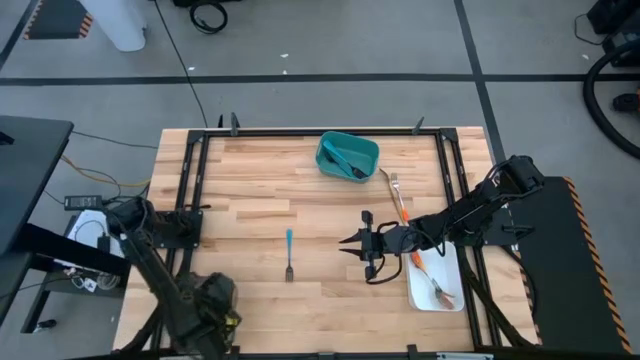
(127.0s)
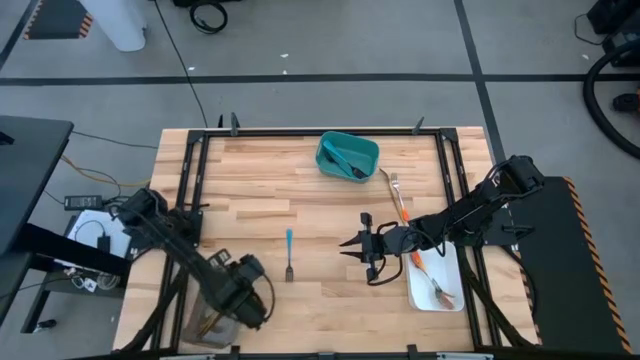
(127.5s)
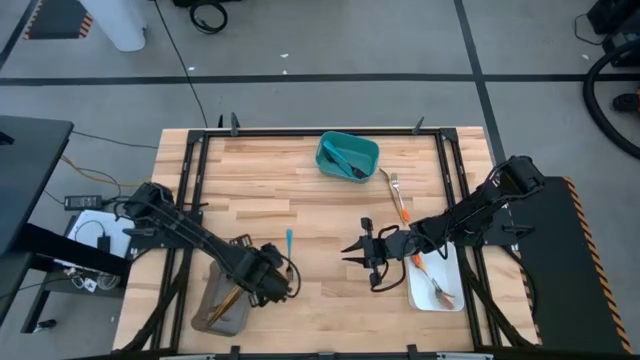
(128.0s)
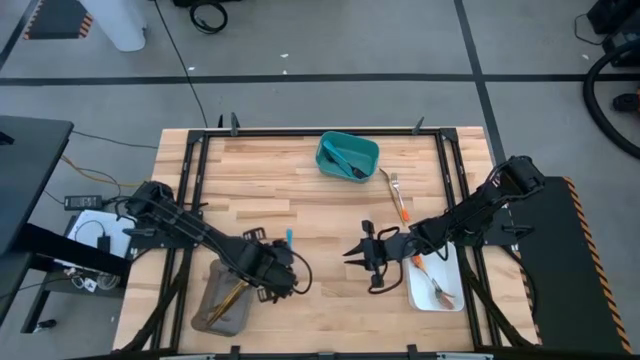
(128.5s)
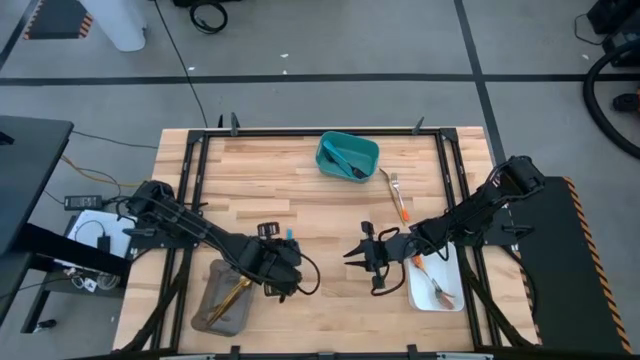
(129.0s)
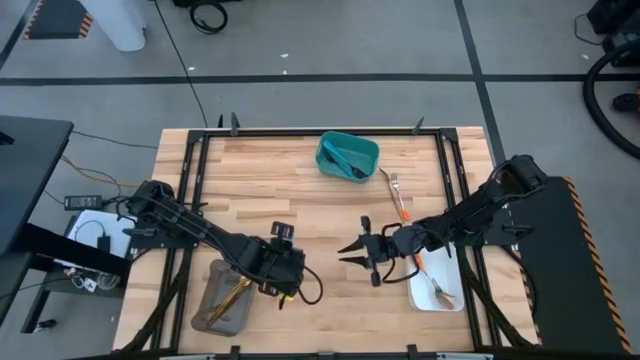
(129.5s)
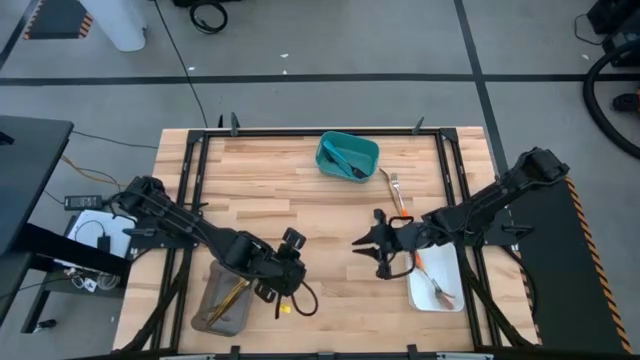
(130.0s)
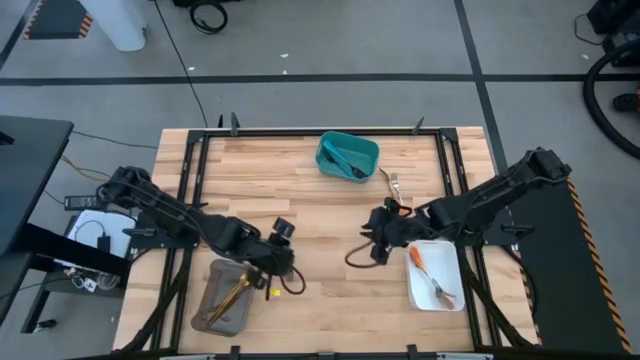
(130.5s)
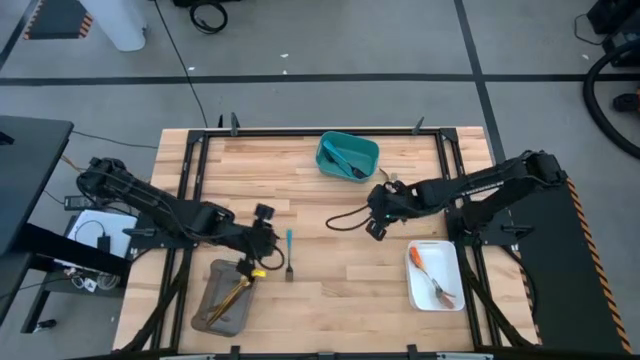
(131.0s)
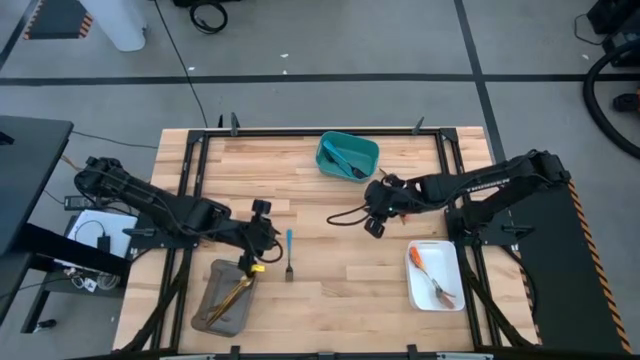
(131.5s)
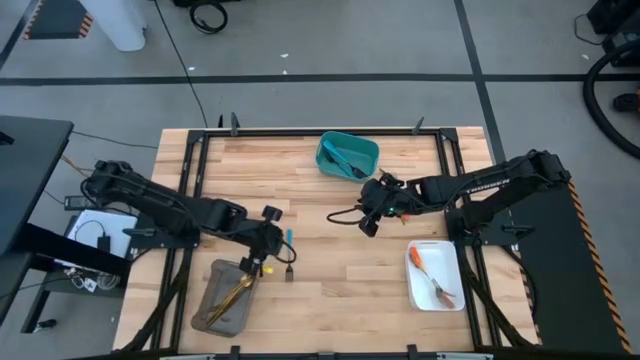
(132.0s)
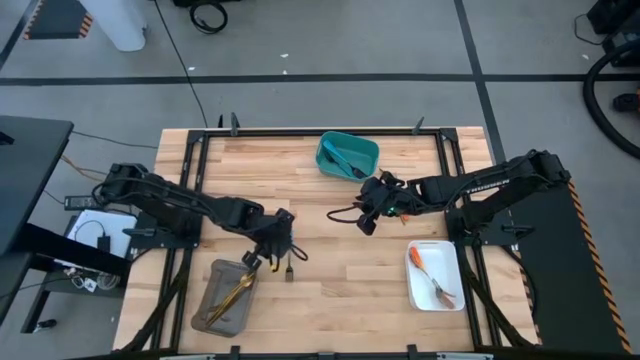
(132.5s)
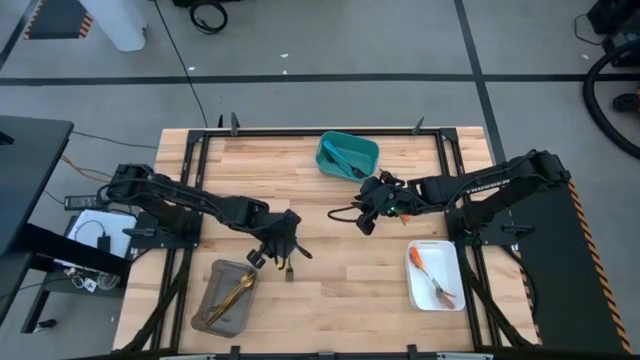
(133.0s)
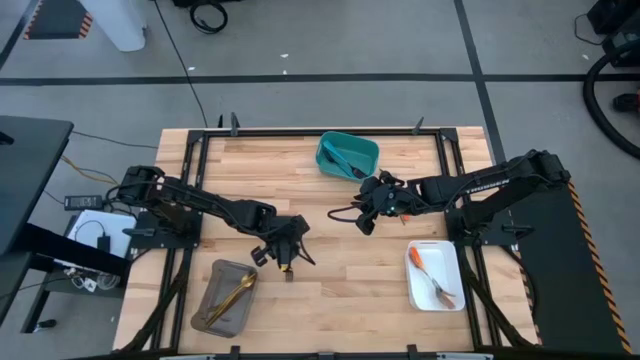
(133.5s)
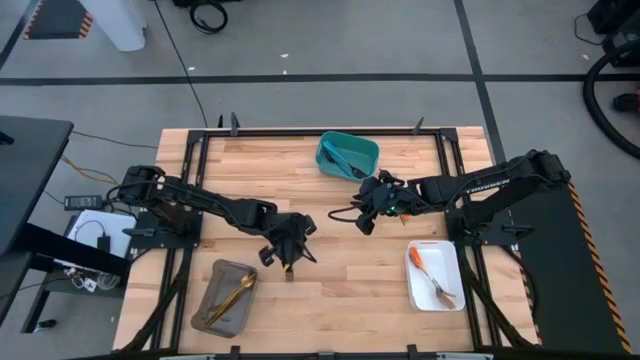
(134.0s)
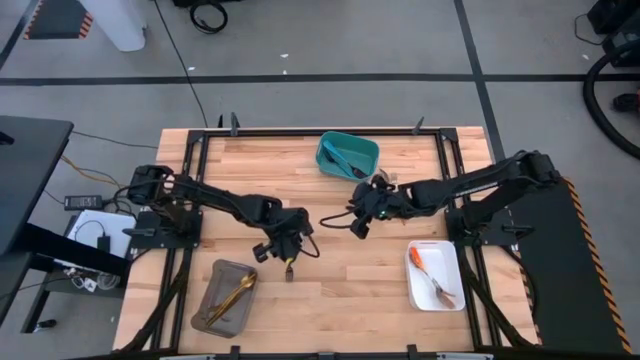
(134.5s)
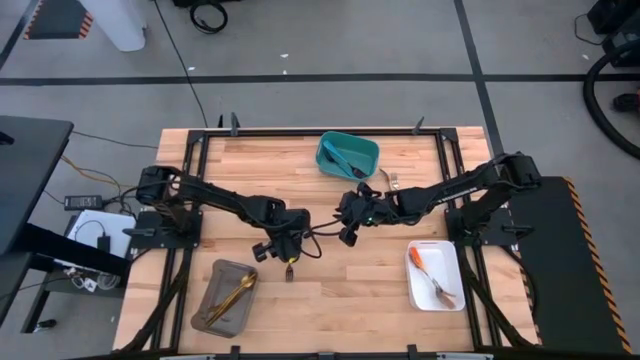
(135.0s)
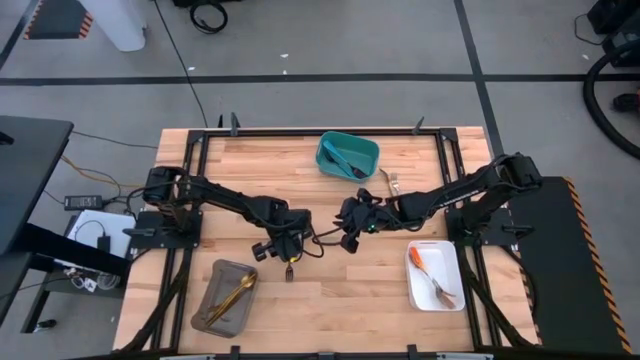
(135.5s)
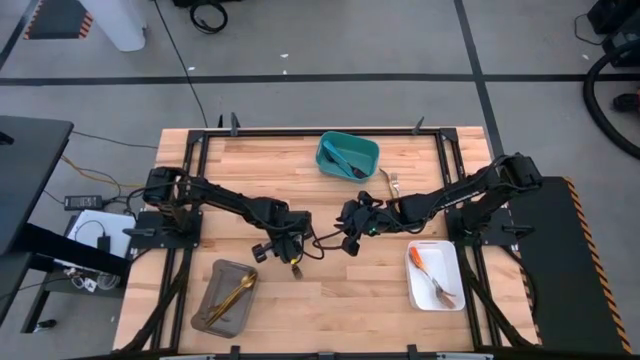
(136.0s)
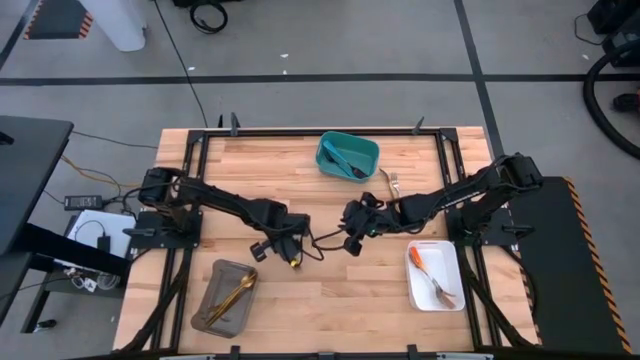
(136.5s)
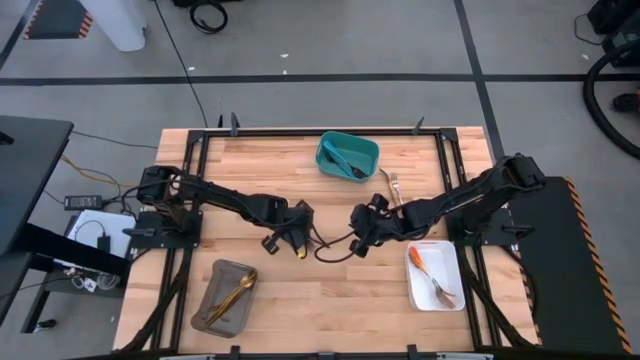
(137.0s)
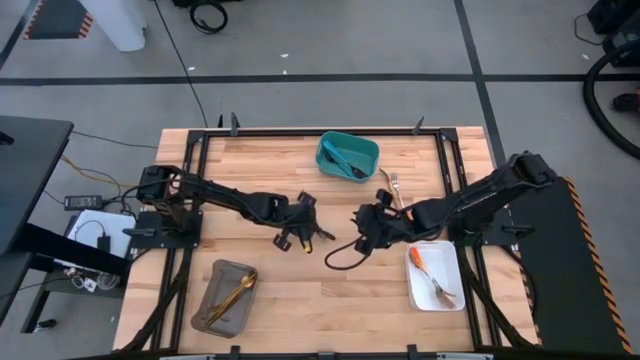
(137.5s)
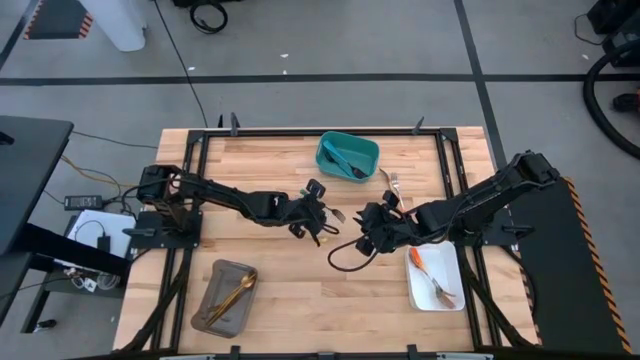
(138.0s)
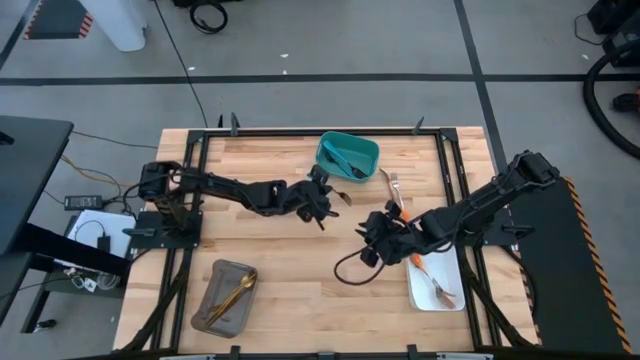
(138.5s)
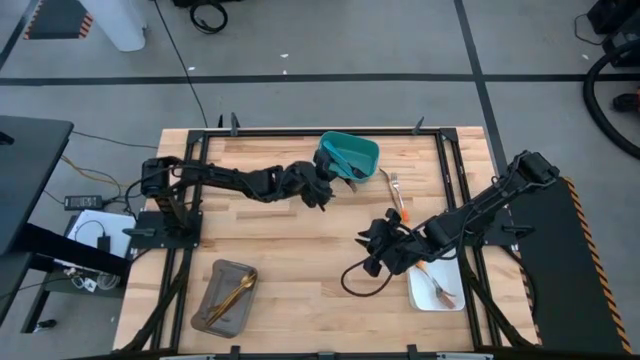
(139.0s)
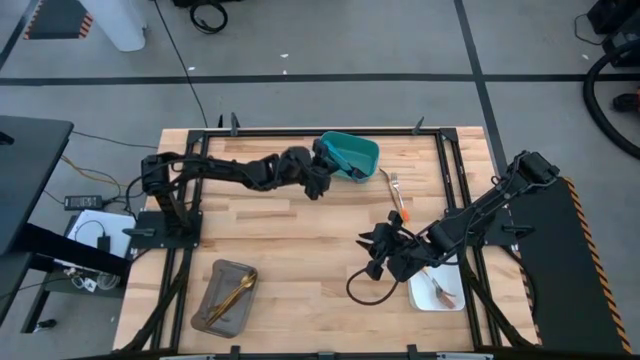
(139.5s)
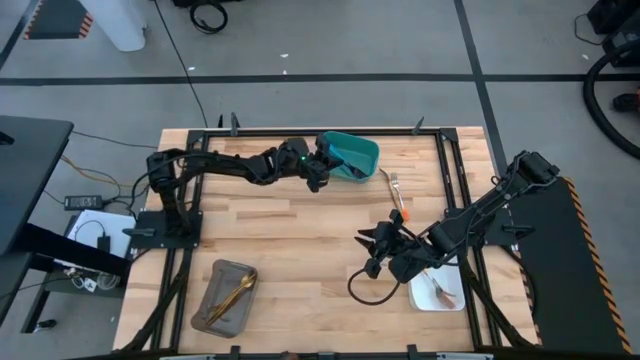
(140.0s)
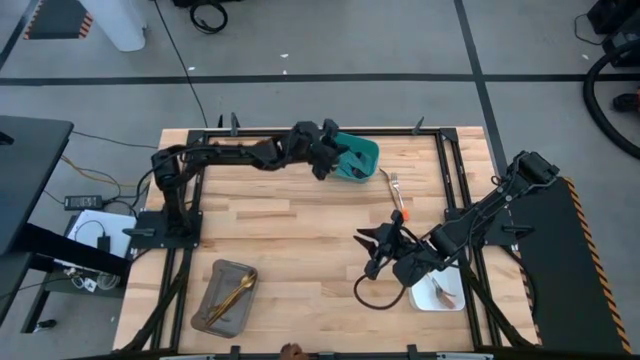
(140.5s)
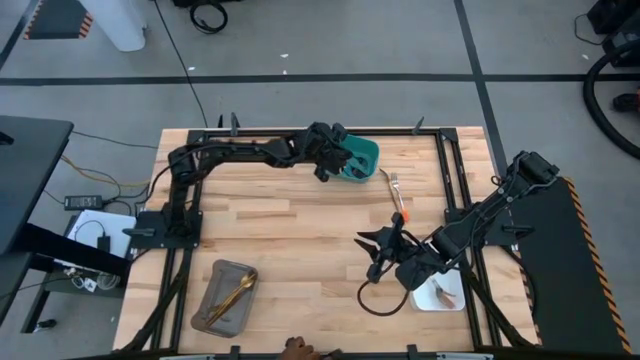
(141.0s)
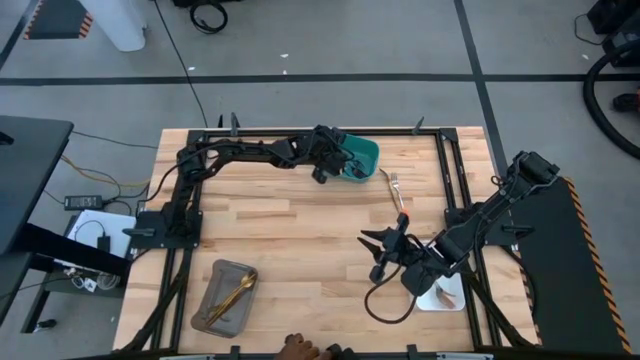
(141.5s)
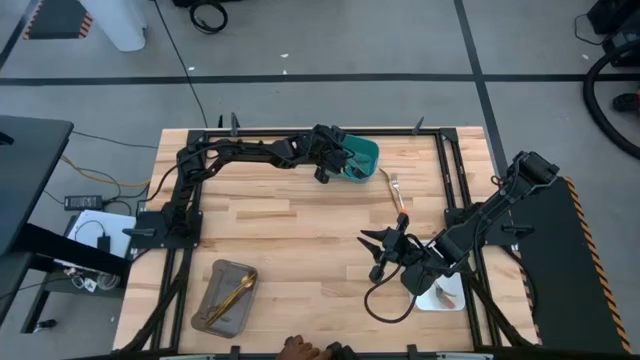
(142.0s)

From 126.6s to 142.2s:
Task: Sort silverware by color (type)
Put the blue fork into the green bin

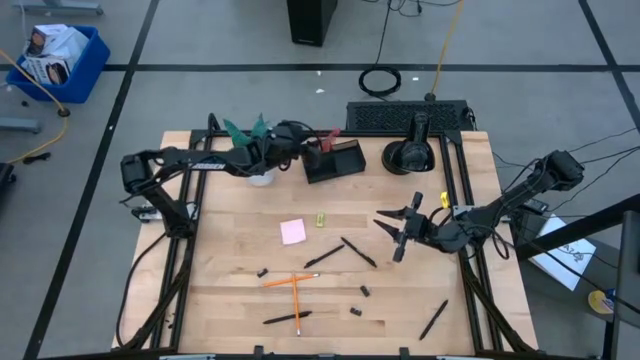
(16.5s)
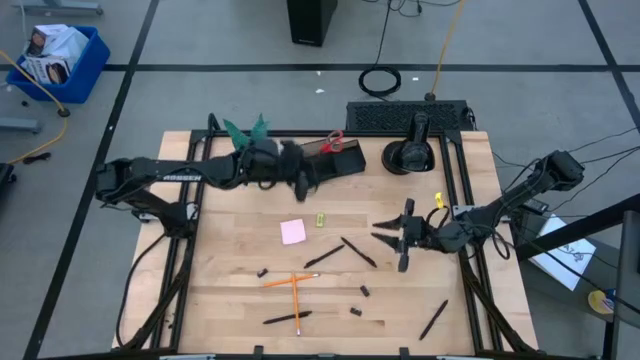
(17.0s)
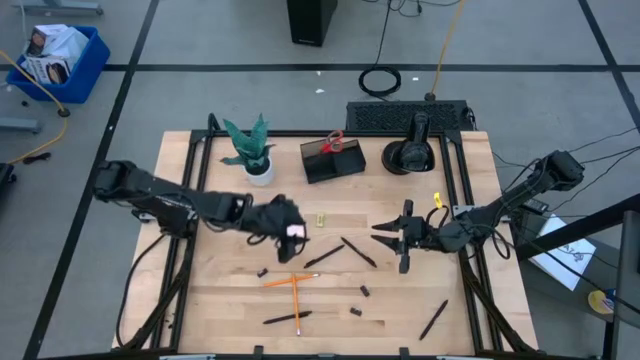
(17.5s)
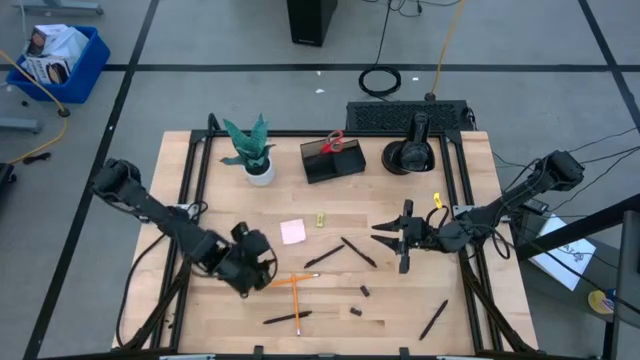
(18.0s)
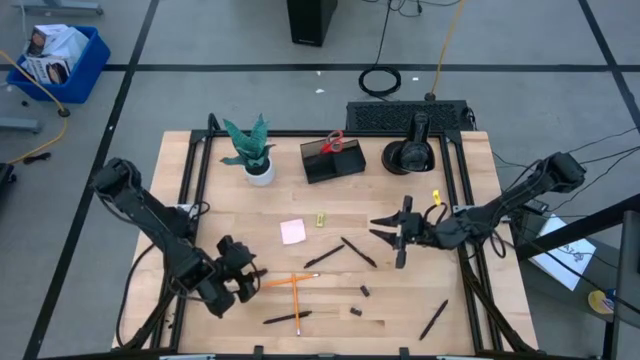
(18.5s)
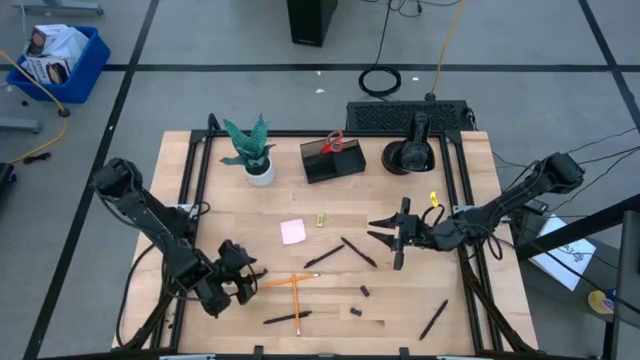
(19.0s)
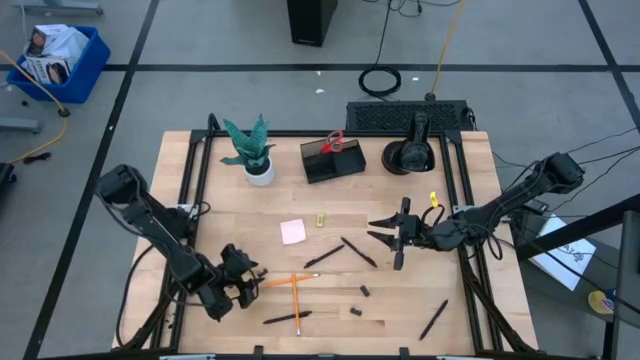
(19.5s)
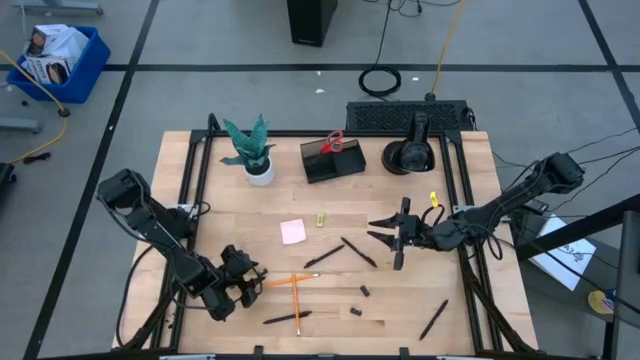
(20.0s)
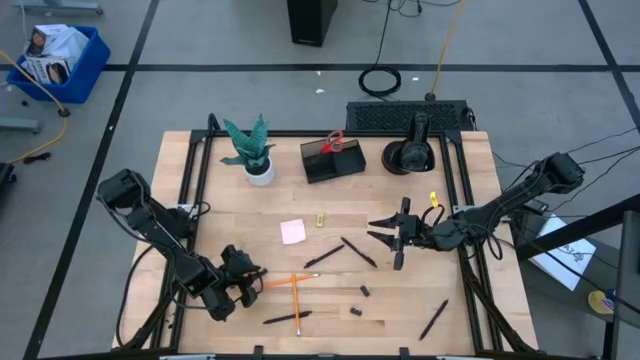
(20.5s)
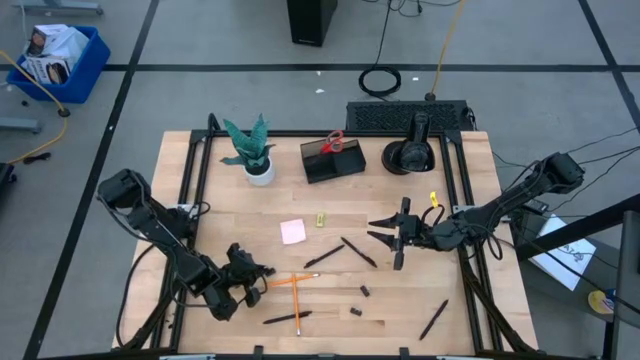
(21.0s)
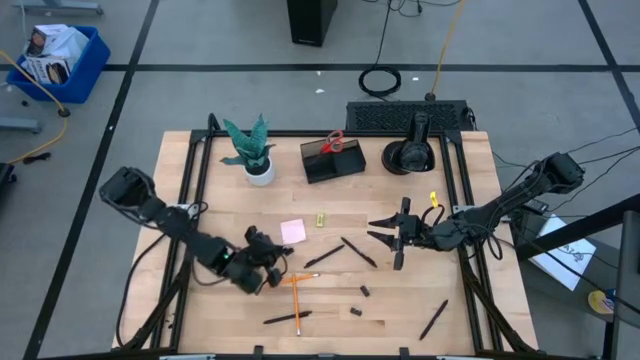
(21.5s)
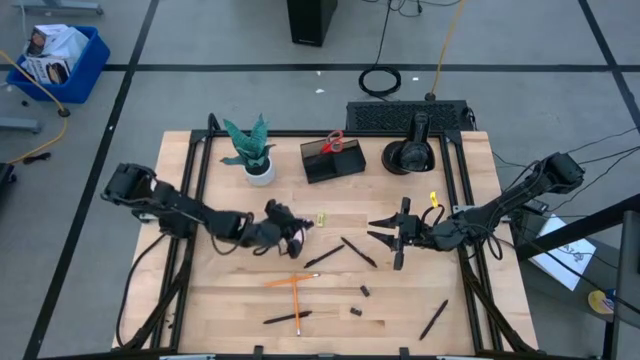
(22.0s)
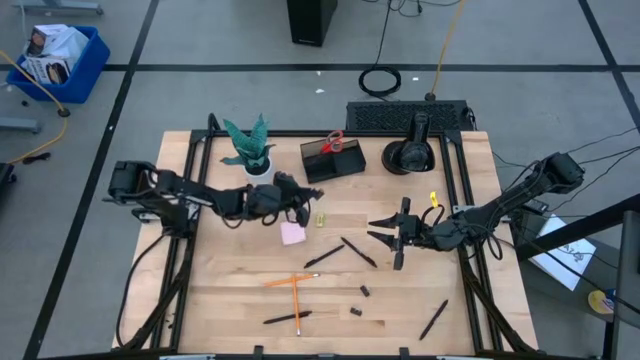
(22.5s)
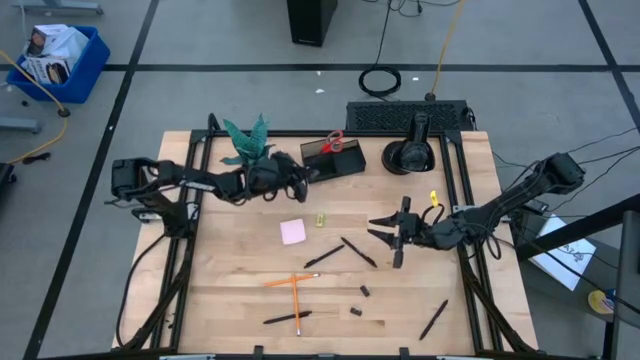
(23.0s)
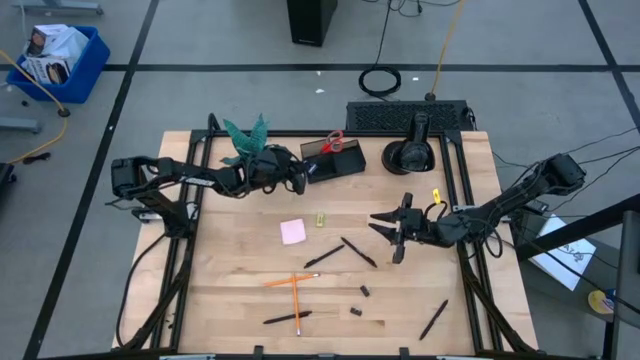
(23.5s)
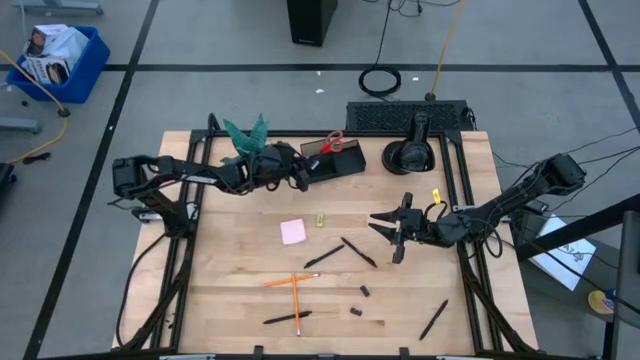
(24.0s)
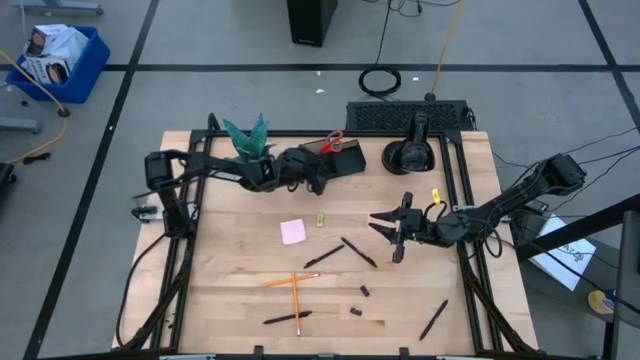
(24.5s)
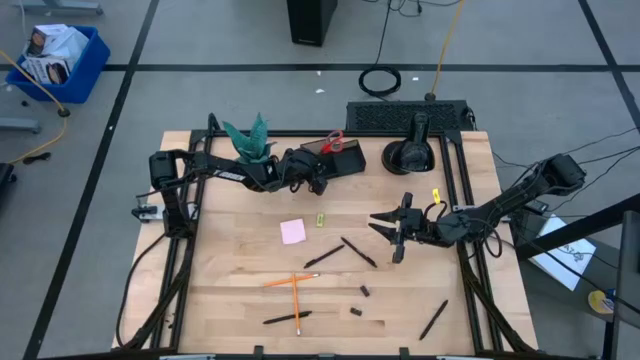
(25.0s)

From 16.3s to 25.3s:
Task: Pick and place office supplies into organizer
Put the black binder clip into the black black mesh desk organizer
